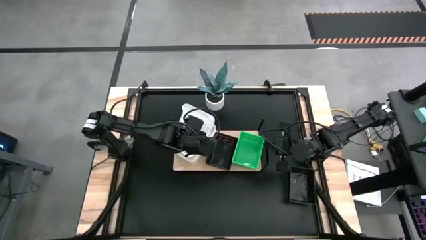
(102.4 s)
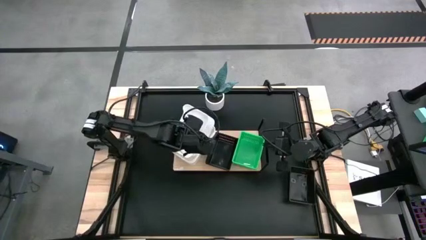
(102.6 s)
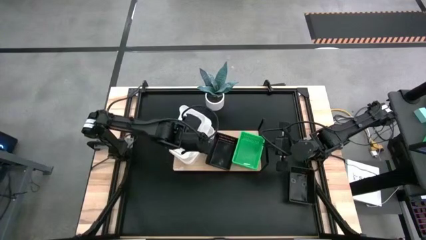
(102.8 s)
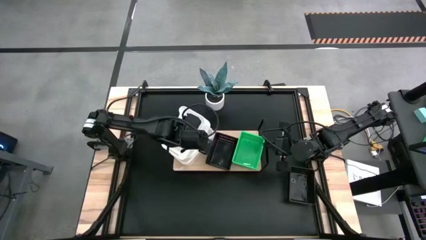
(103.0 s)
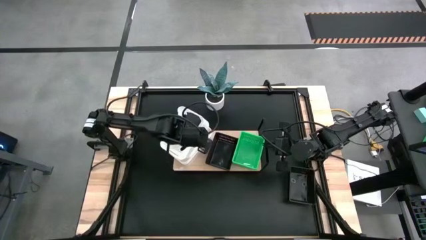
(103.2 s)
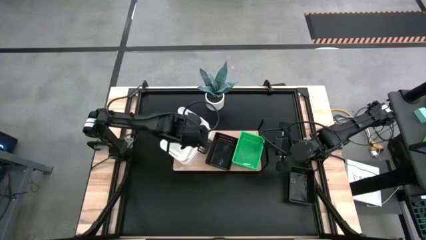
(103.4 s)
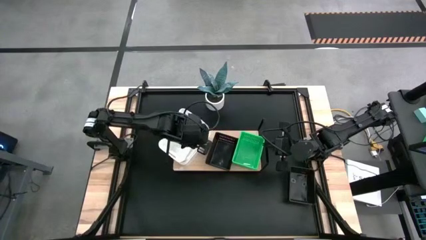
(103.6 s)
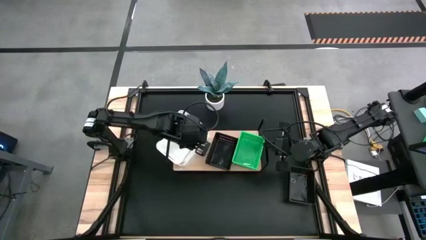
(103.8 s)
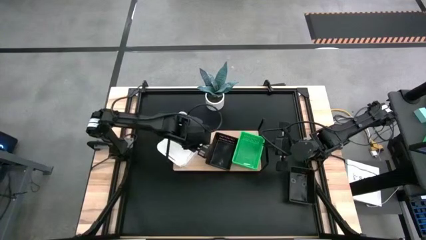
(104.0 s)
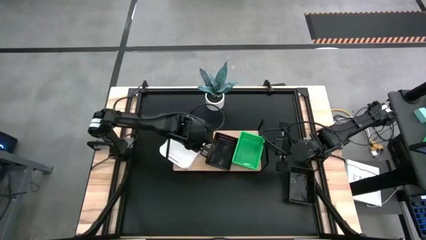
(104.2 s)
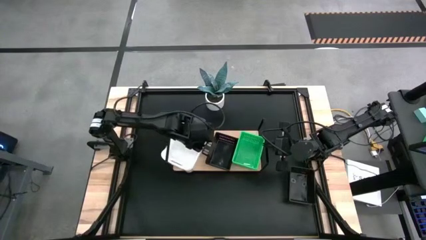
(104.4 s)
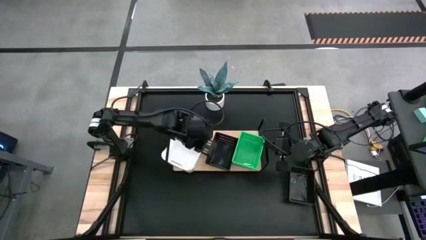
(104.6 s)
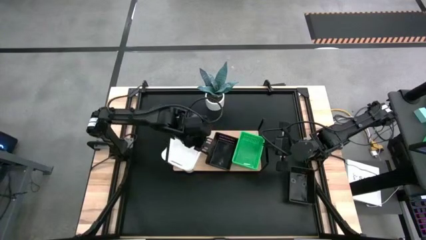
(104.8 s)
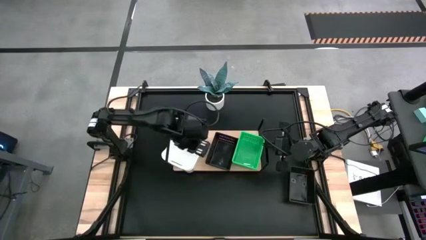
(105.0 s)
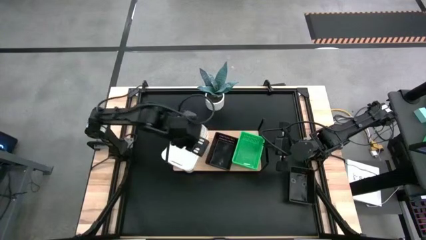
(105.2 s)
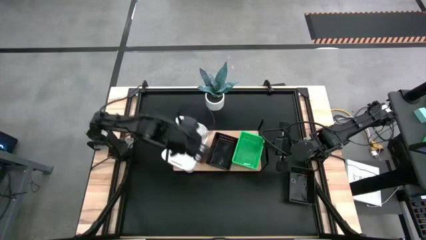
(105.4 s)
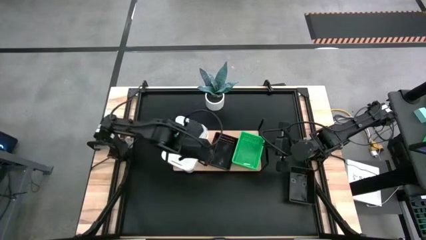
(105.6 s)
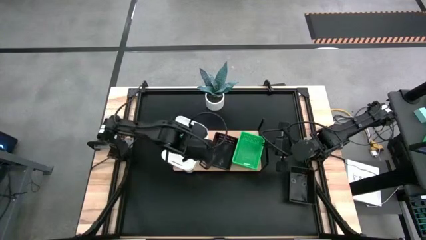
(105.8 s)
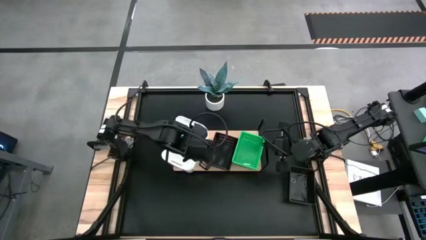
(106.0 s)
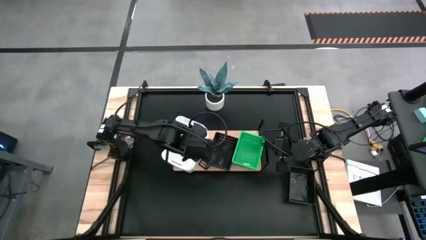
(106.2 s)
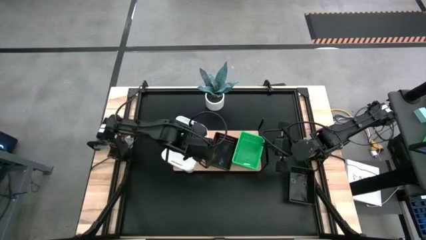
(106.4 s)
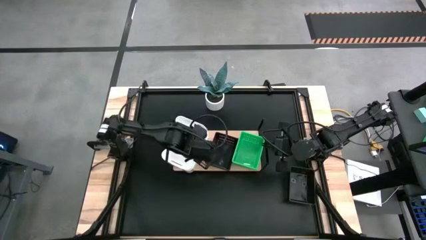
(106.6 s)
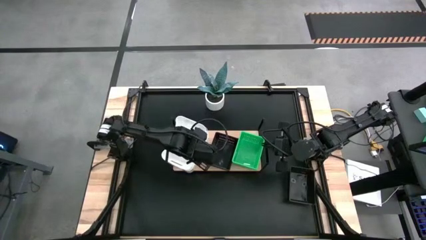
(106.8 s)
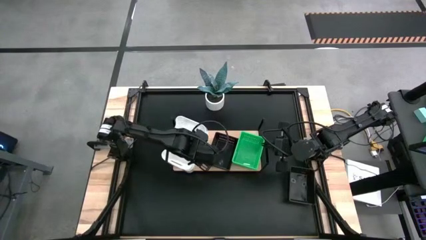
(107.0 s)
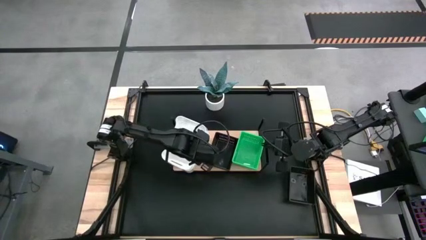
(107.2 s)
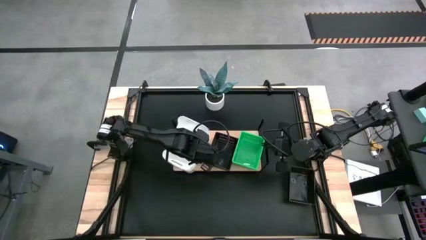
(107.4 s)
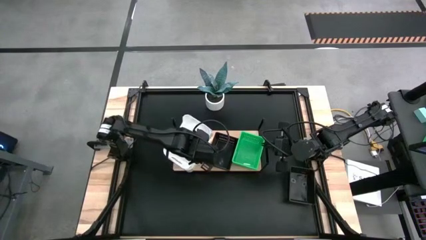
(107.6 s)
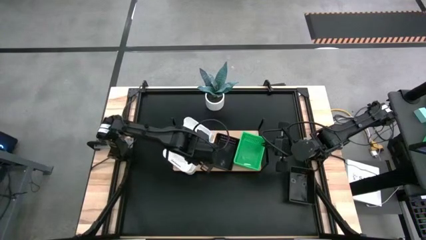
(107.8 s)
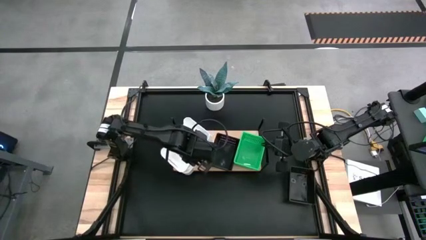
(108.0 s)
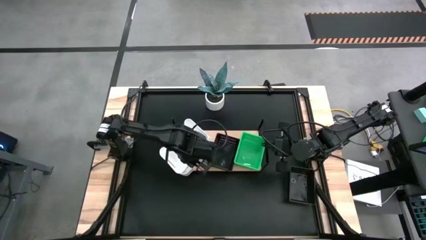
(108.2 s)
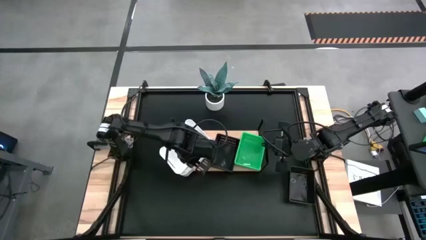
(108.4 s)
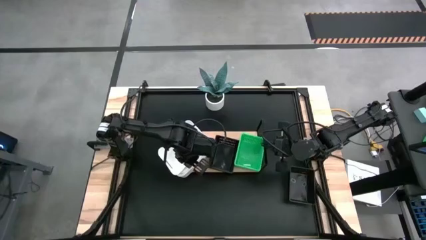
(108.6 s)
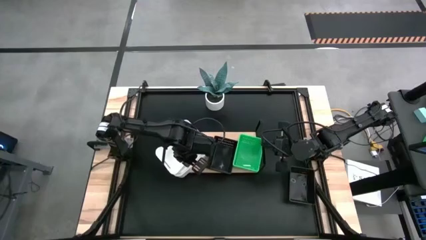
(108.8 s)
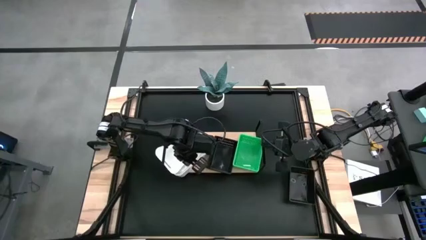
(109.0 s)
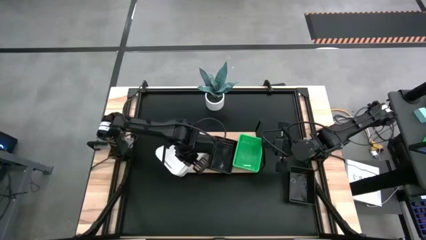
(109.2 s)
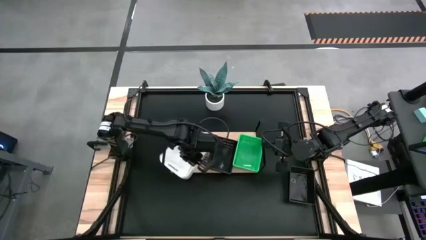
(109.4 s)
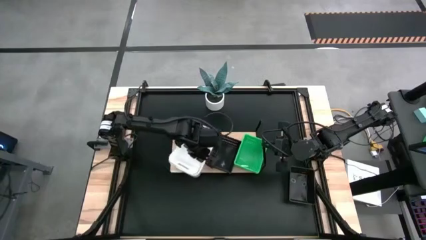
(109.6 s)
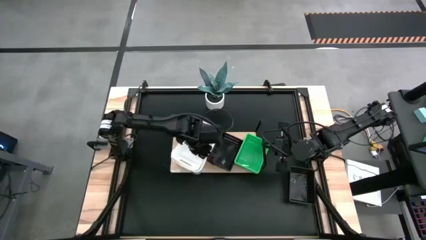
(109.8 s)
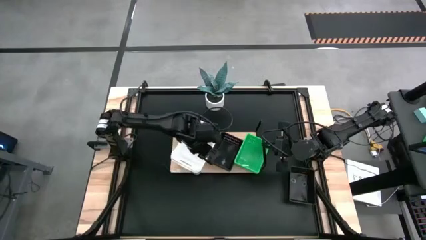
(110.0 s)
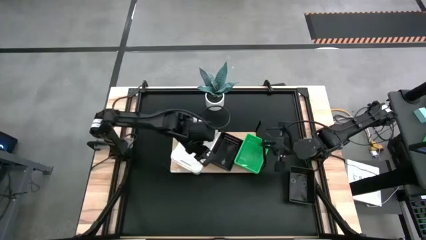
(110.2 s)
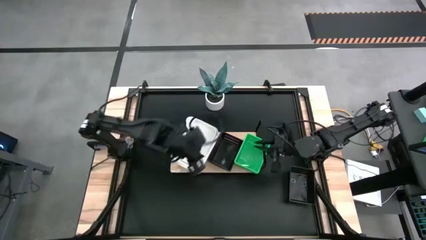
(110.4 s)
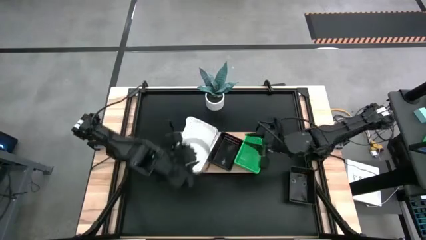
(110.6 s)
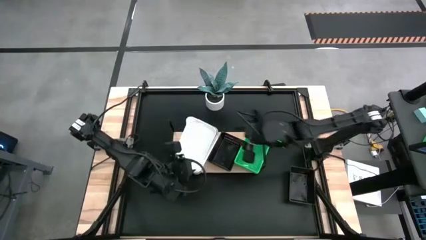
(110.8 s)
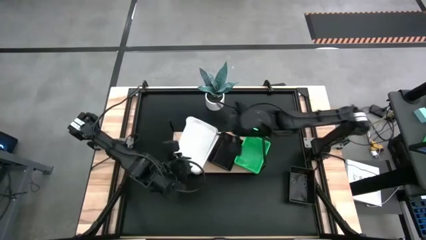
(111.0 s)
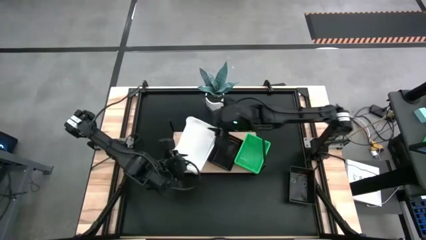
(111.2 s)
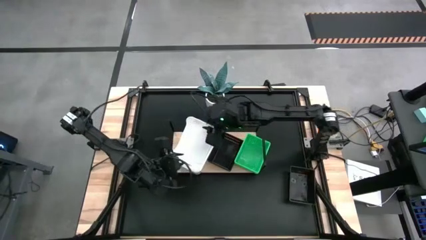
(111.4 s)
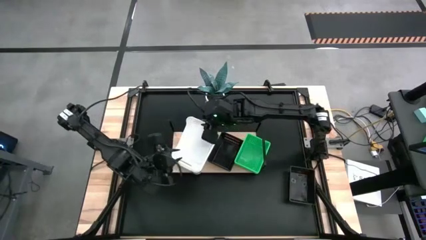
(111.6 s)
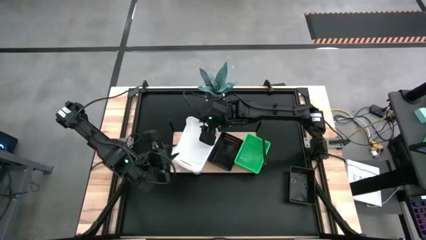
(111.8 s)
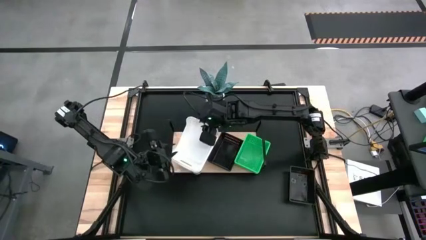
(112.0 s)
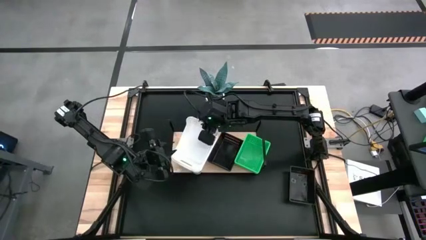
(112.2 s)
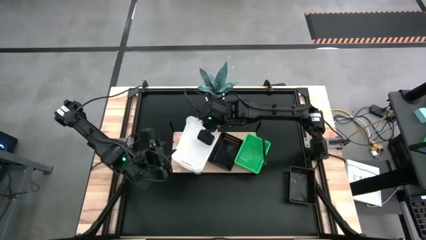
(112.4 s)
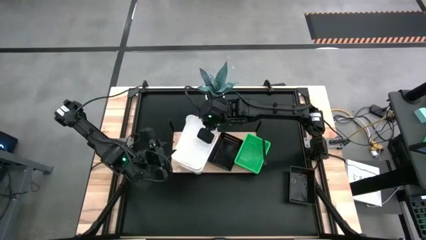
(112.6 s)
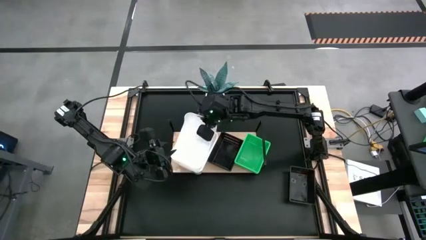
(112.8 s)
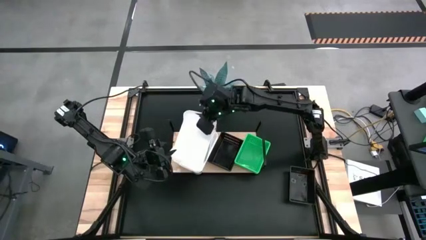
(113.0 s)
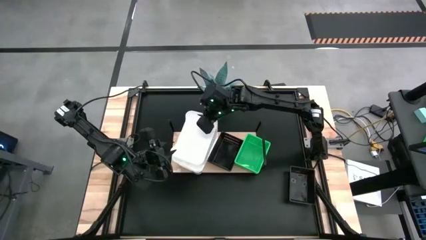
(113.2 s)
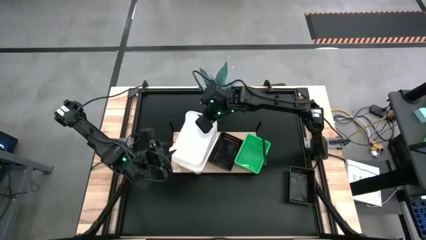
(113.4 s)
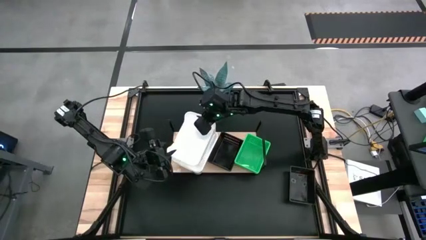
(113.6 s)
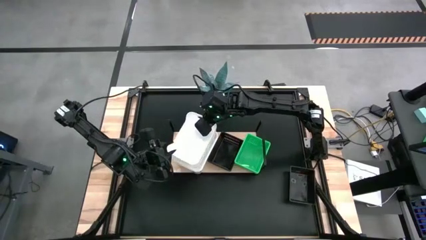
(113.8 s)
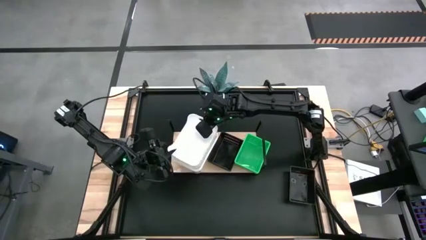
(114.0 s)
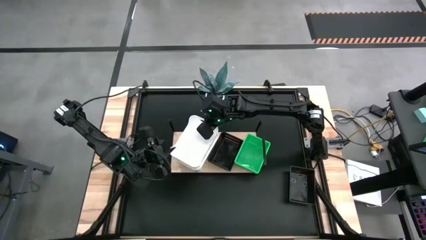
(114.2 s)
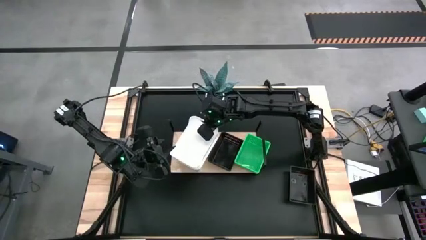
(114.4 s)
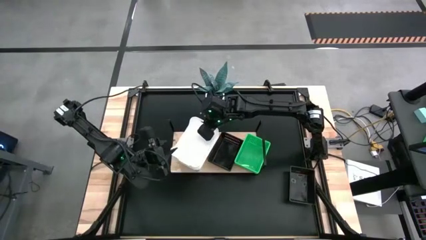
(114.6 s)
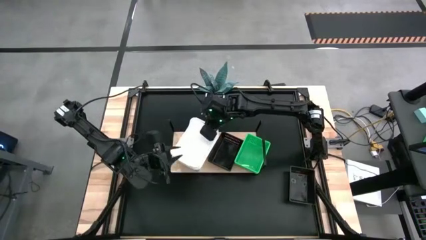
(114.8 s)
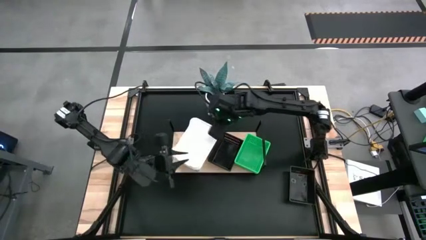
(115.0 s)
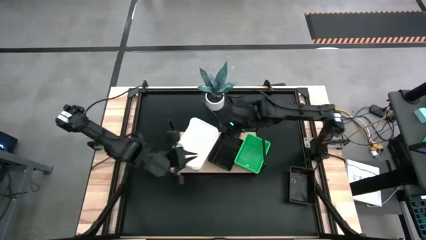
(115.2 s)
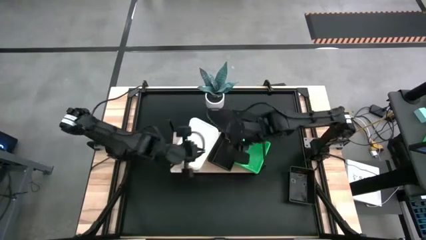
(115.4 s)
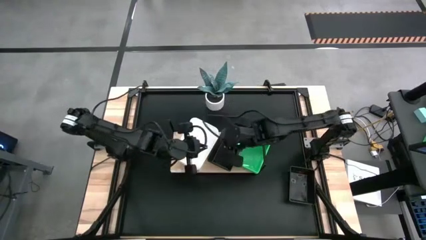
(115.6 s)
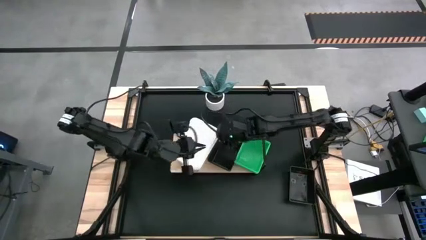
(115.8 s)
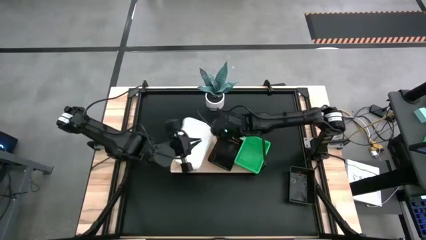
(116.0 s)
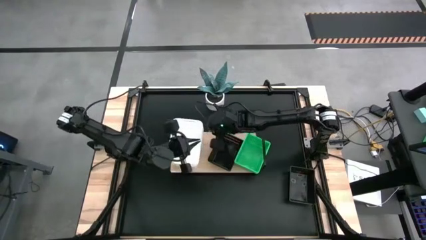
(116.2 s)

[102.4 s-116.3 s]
Task: Stack baskets on shelf by color
Stack the white bin on top of the other white bins on the shelf

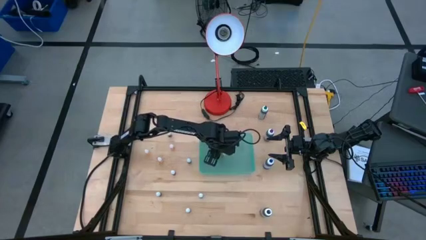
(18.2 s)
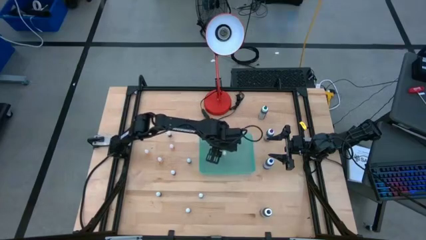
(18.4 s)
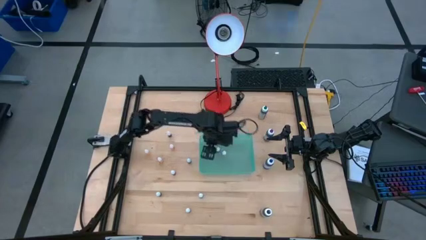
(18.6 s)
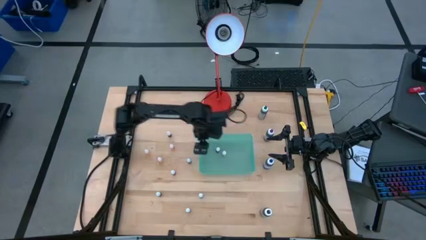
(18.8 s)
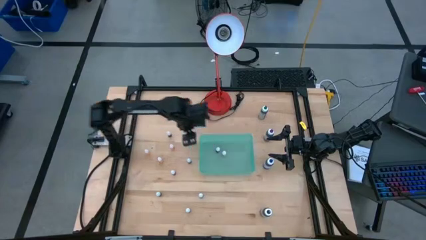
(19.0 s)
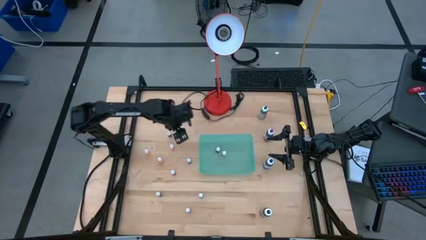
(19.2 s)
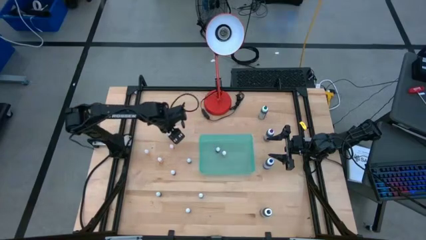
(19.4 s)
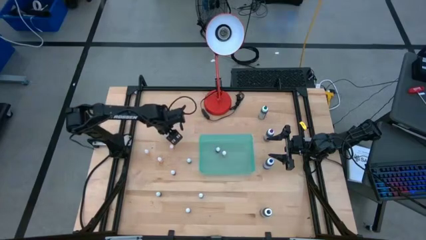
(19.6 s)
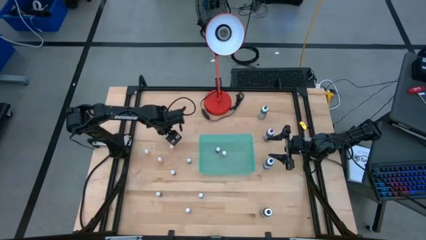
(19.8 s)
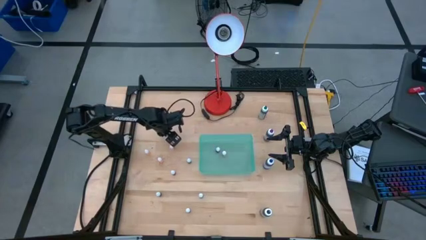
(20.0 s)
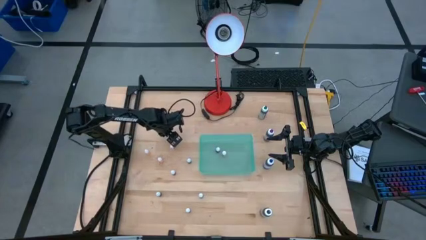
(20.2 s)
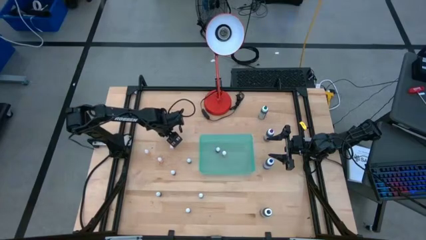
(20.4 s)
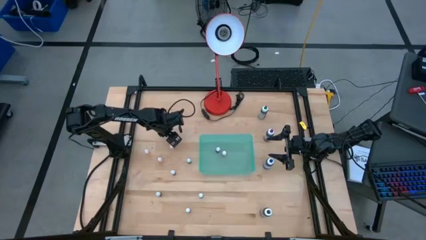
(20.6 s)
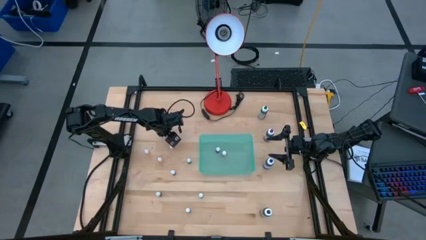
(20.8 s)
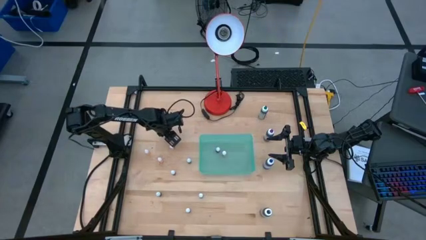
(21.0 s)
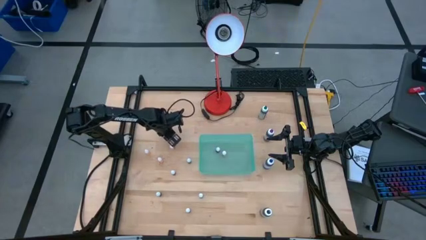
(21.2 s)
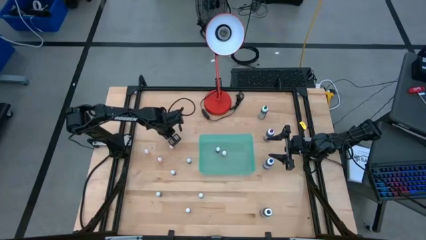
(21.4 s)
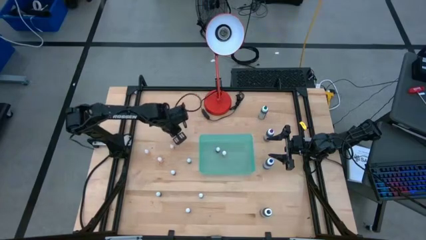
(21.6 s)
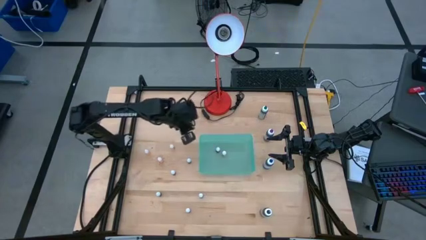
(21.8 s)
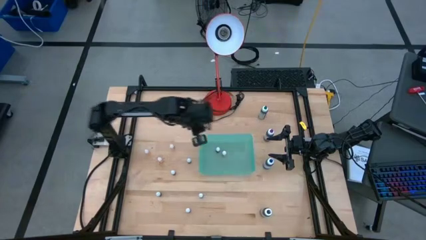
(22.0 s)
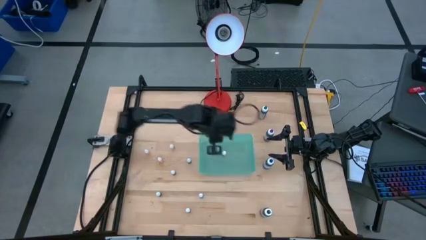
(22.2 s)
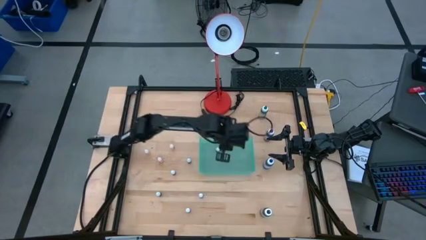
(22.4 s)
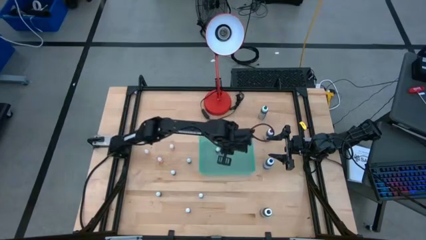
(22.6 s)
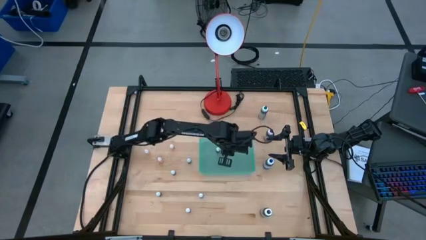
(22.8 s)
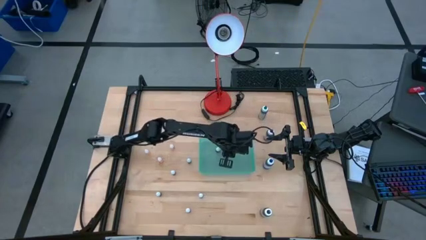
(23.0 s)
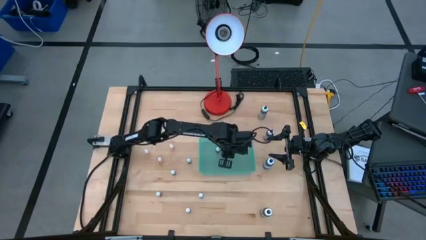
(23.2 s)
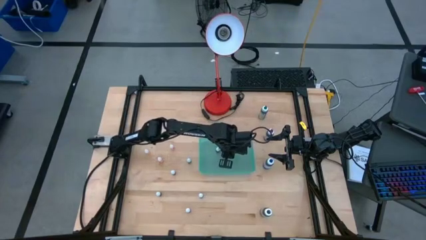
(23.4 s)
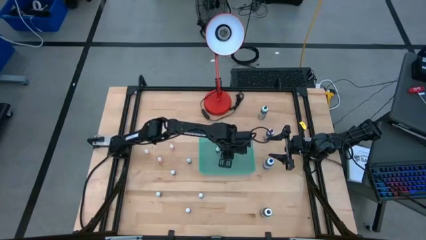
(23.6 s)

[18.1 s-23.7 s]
Task: Pick & Place food coloring
Put the small red food coloring bottle into the green bin
